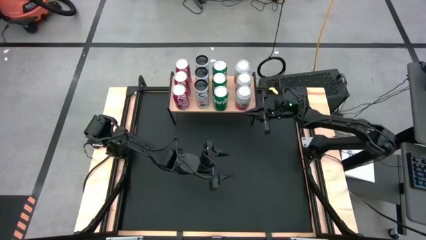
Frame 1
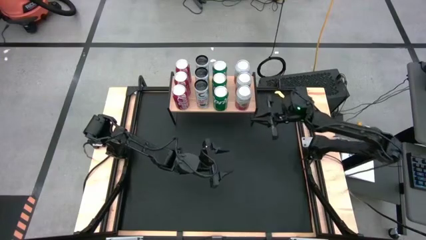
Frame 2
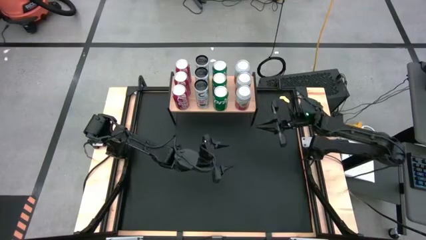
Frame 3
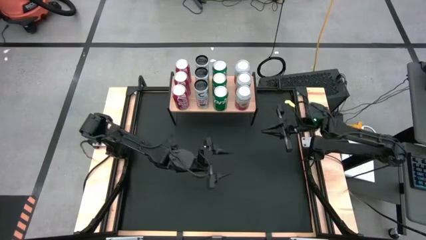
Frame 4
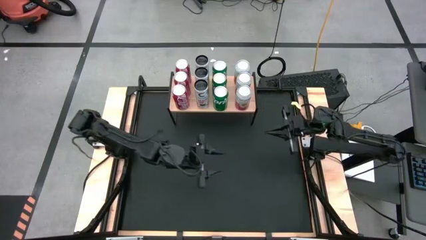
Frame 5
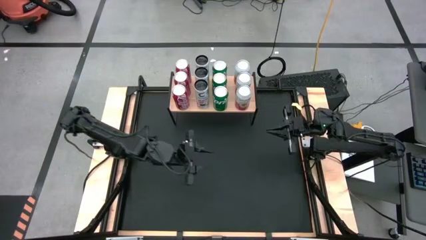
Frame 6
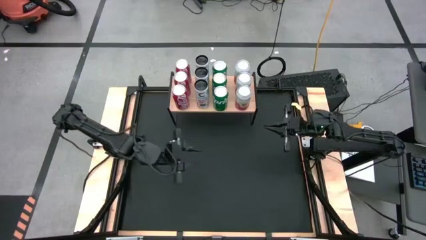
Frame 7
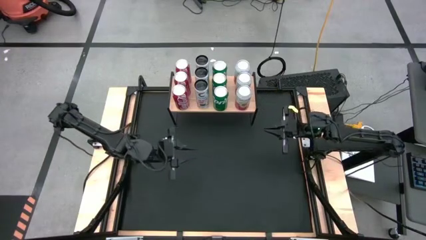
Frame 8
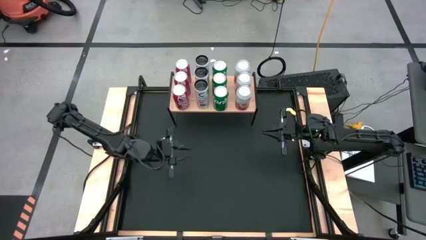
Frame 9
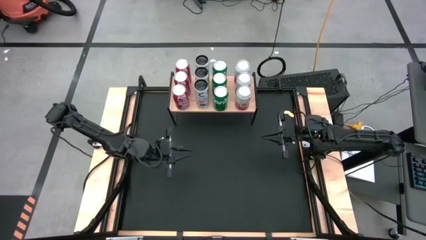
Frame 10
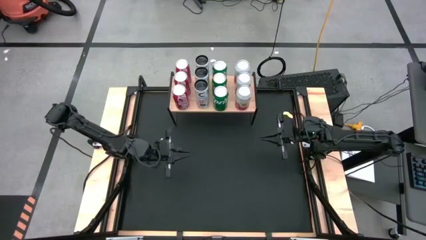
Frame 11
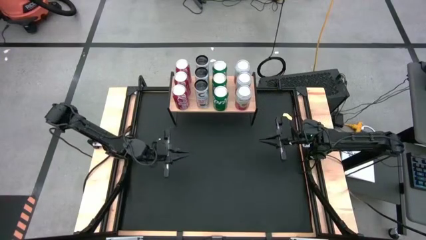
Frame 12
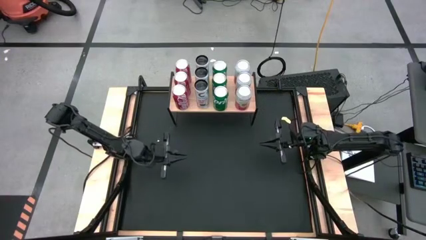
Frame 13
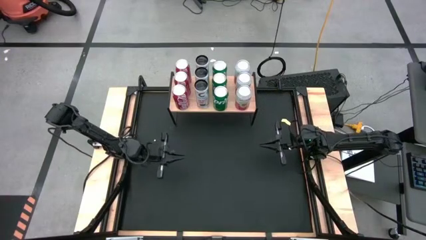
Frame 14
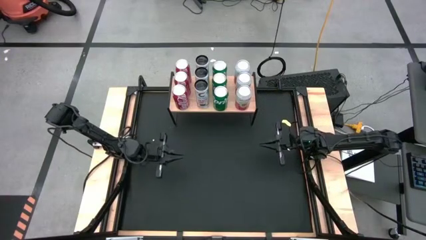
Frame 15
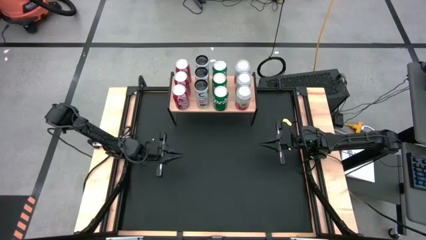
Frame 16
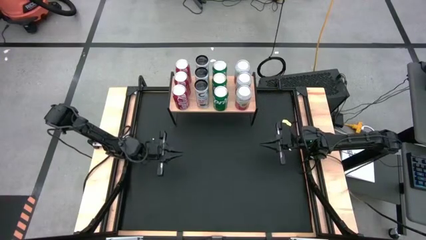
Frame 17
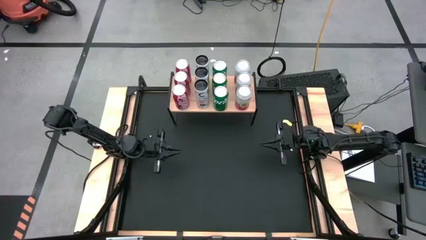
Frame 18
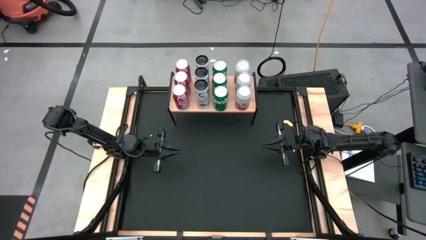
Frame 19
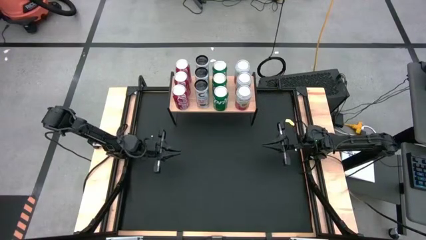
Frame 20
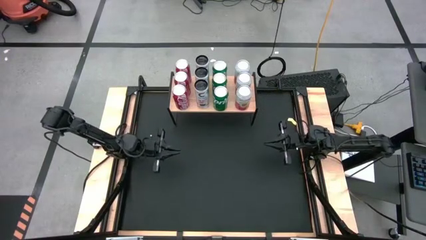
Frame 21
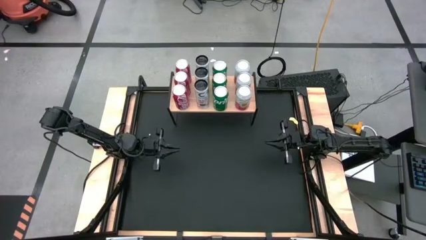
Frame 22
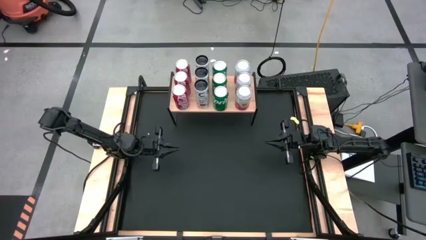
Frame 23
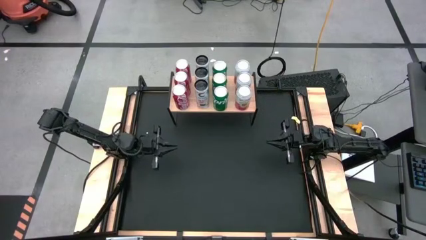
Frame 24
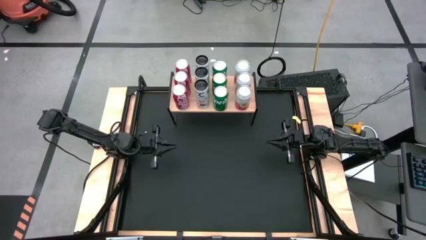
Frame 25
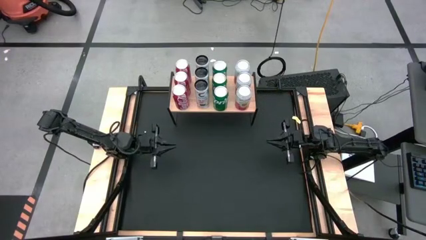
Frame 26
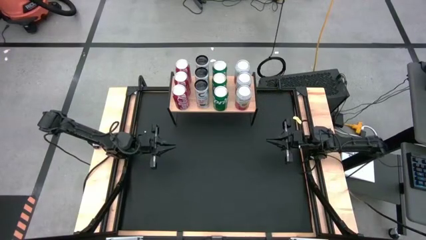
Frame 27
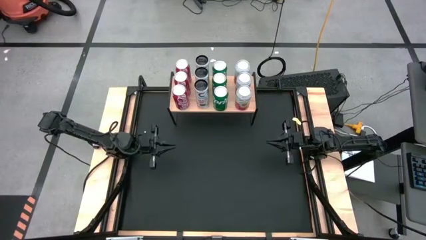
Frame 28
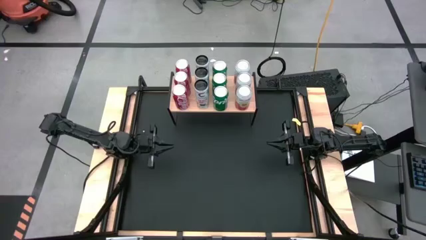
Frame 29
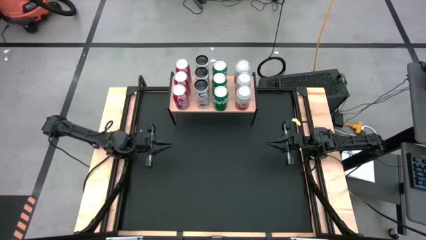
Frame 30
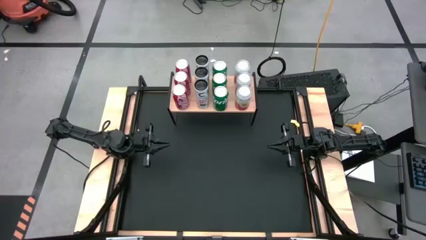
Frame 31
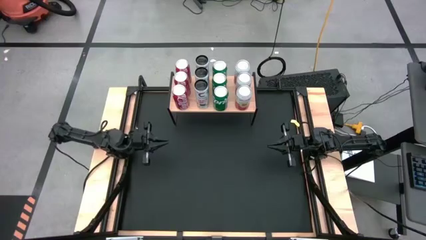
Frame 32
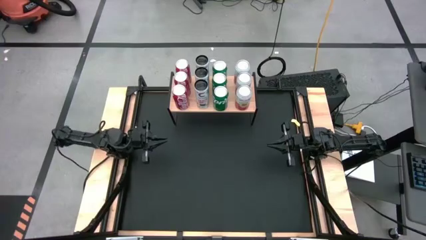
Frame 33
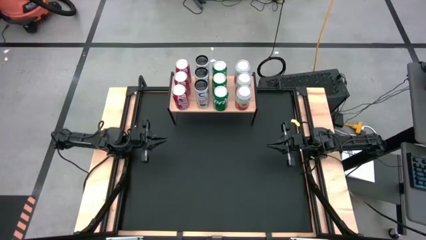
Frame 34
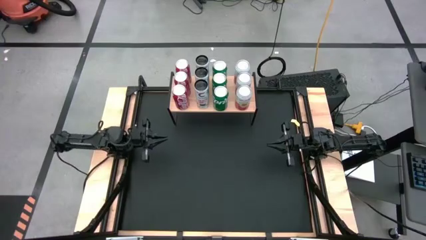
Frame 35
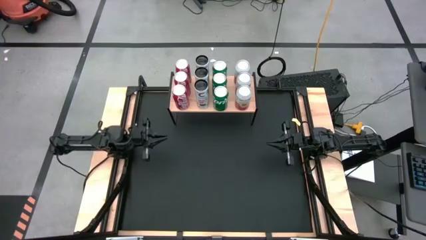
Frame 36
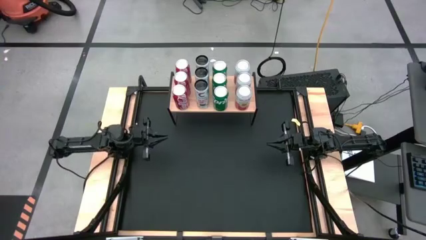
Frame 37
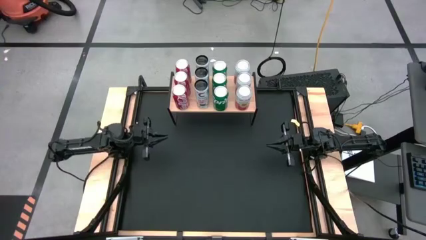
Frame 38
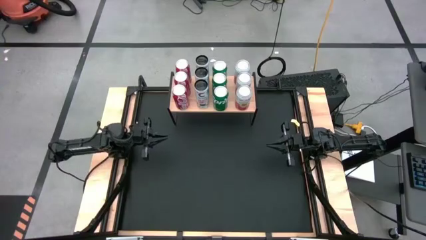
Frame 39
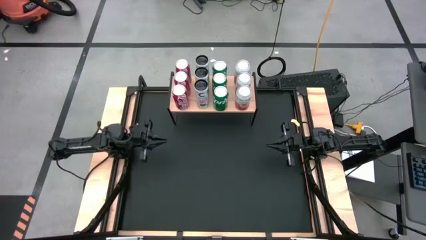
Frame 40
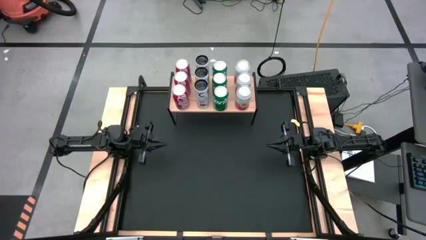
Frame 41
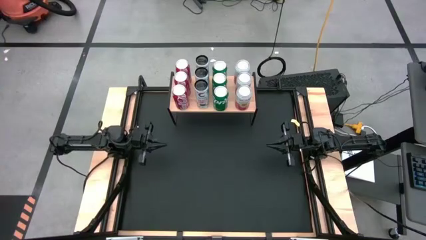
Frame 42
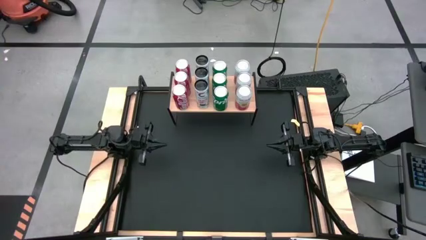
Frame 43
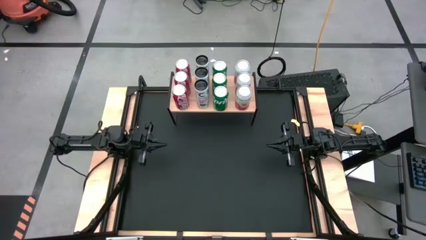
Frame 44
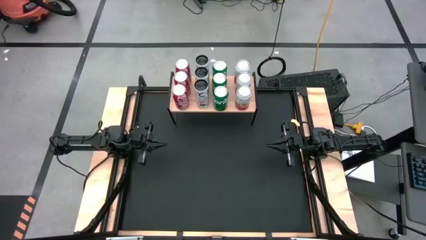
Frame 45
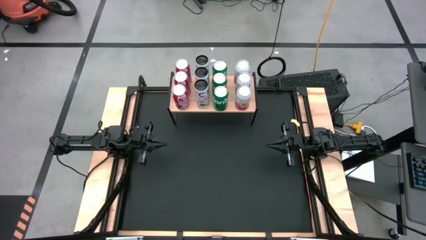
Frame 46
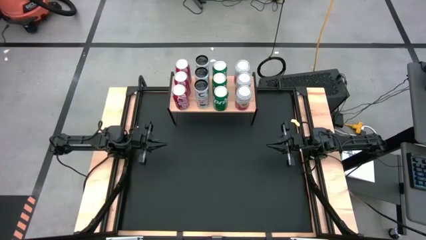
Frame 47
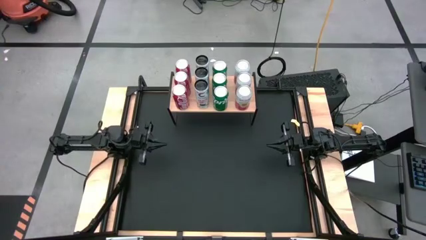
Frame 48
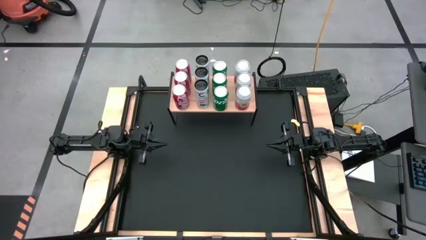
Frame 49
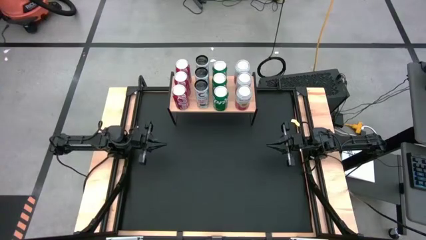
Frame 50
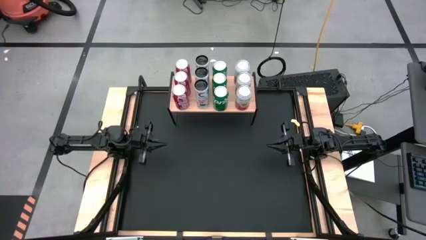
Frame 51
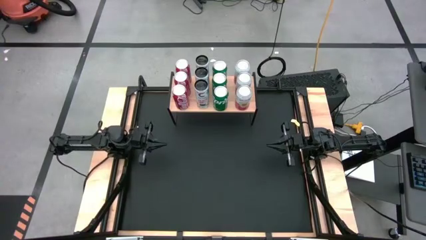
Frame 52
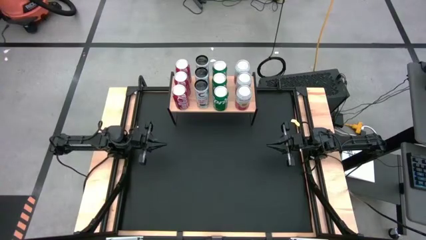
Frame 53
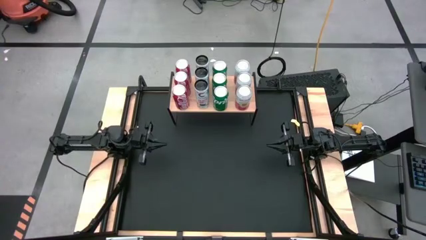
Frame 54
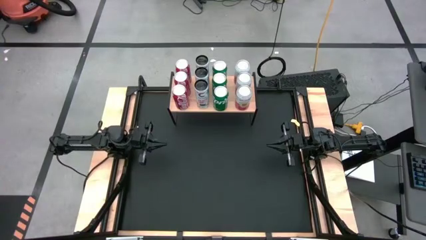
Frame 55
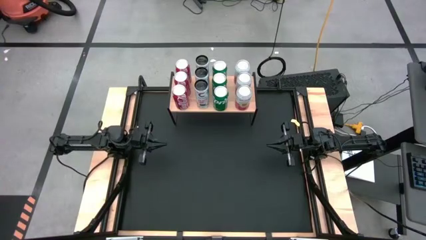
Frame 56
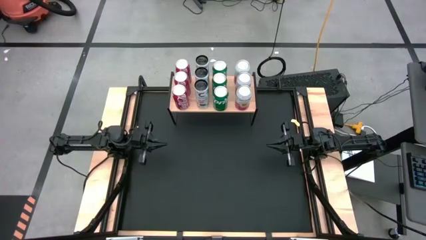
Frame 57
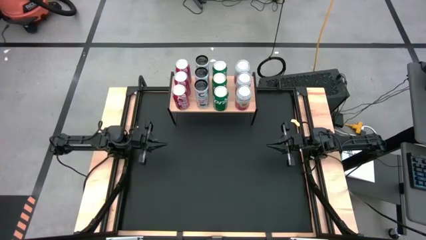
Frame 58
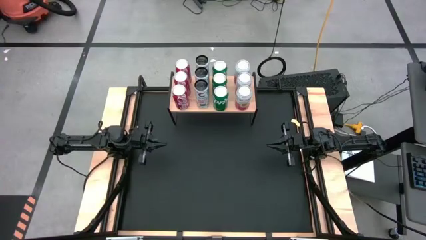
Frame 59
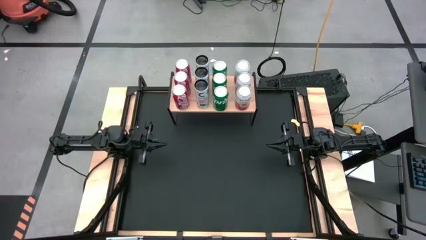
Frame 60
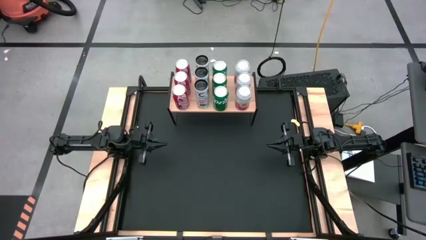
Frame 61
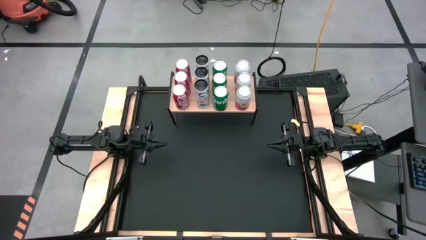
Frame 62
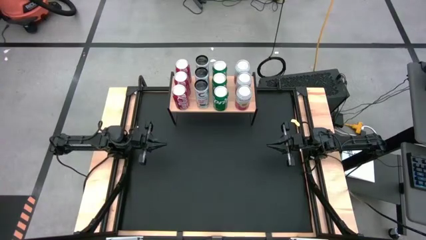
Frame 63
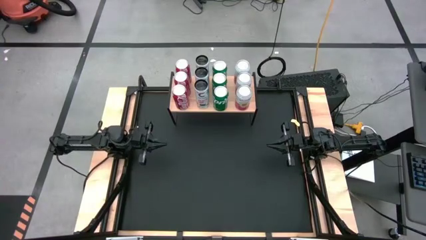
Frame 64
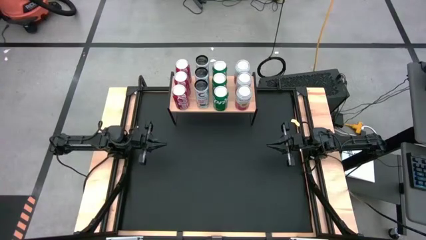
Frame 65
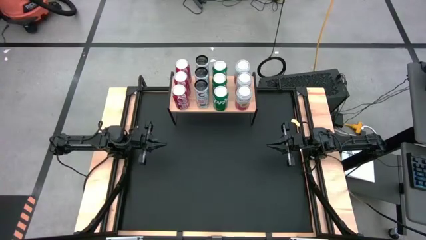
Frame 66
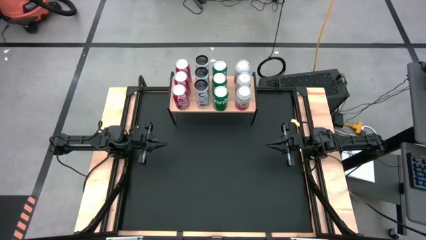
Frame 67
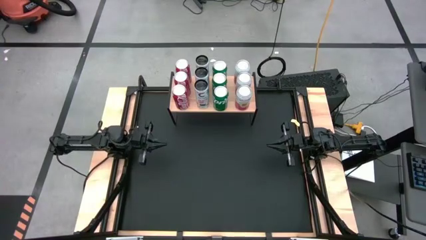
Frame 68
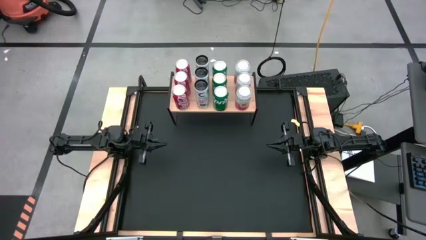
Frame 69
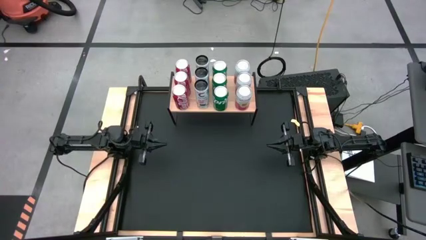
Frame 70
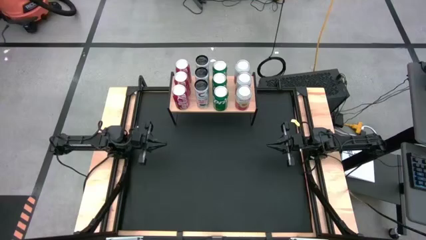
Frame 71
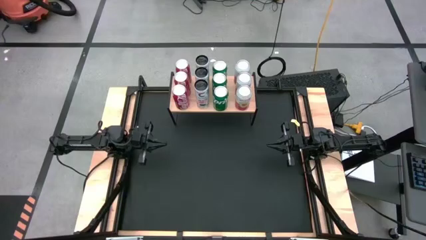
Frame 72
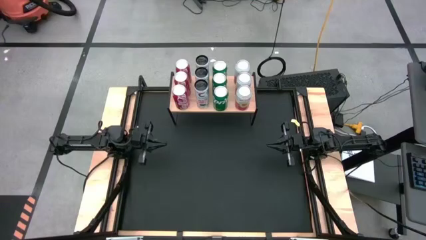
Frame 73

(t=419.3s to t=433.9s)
Task: Place canned beverage on shelf
Return to Home Position
